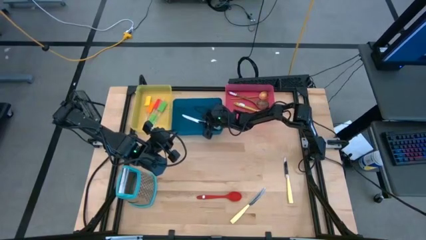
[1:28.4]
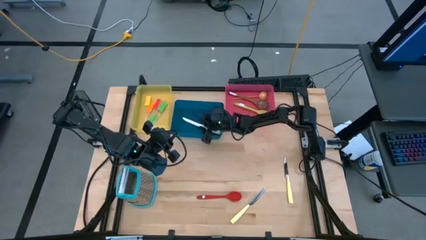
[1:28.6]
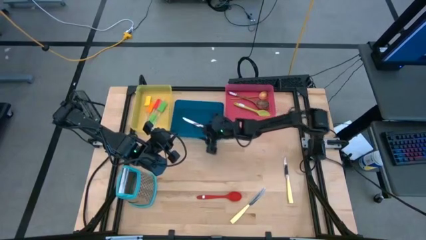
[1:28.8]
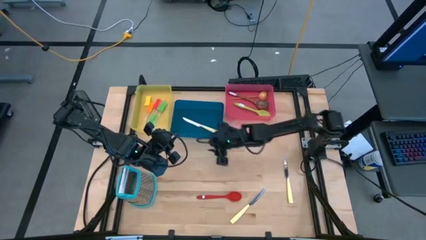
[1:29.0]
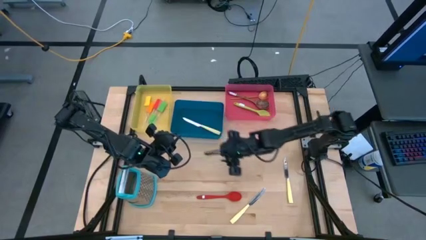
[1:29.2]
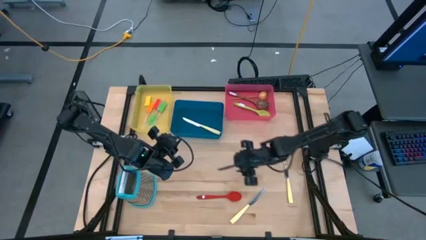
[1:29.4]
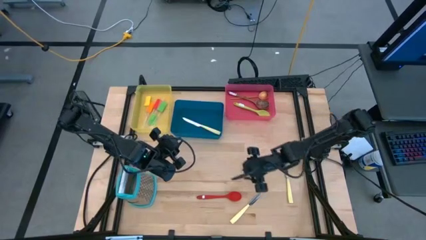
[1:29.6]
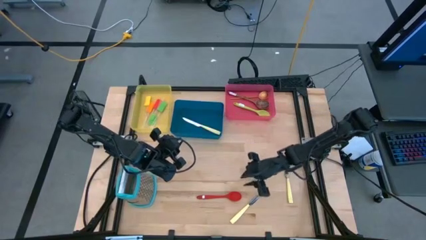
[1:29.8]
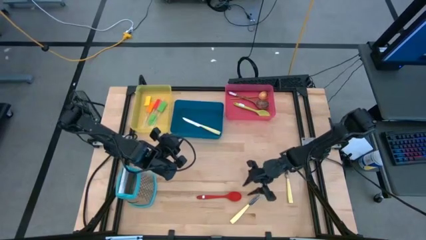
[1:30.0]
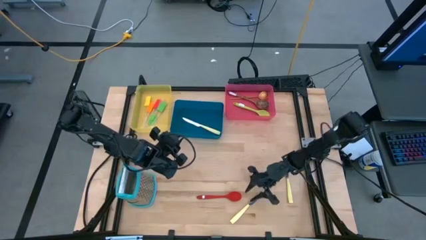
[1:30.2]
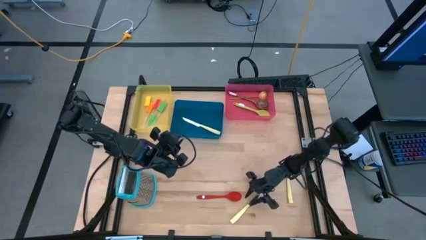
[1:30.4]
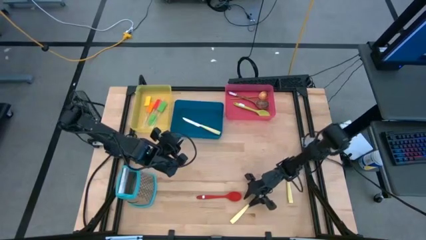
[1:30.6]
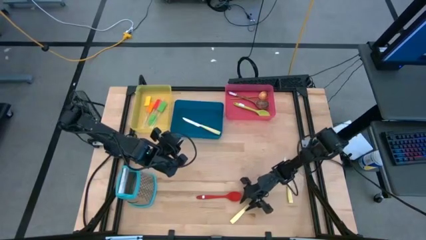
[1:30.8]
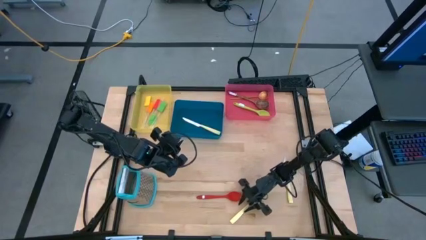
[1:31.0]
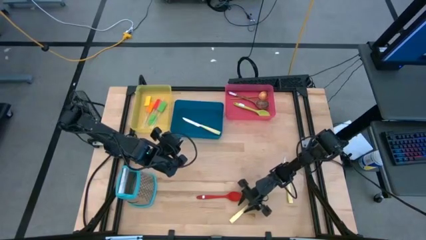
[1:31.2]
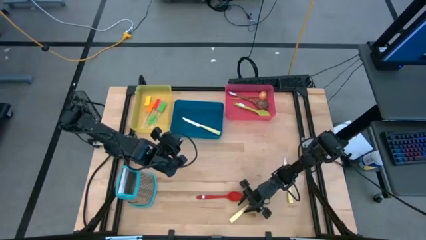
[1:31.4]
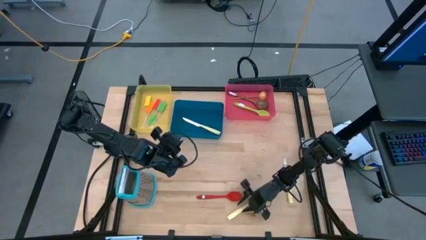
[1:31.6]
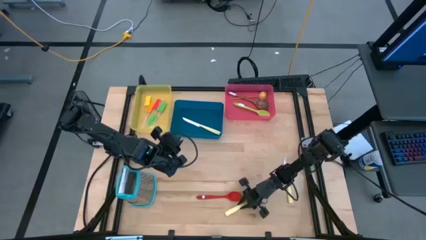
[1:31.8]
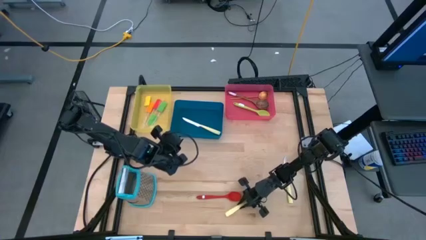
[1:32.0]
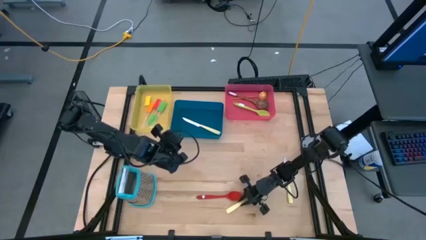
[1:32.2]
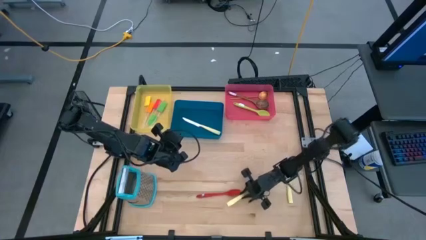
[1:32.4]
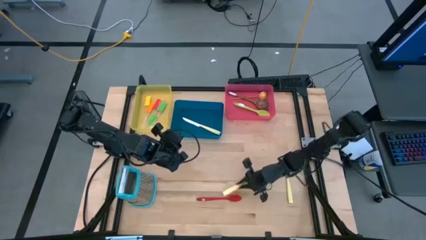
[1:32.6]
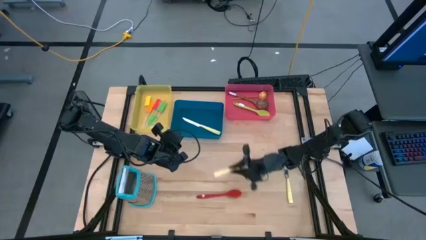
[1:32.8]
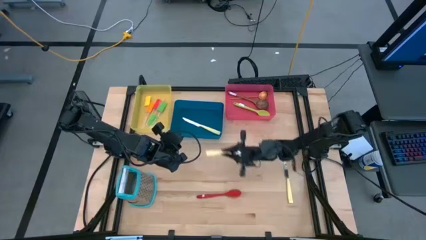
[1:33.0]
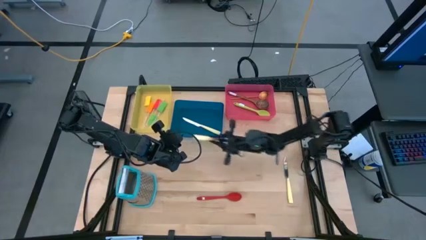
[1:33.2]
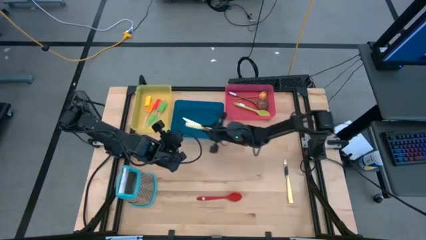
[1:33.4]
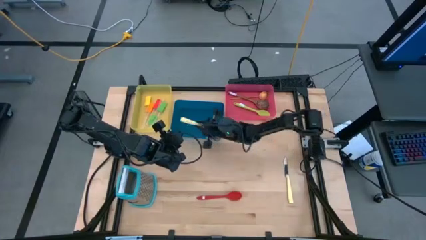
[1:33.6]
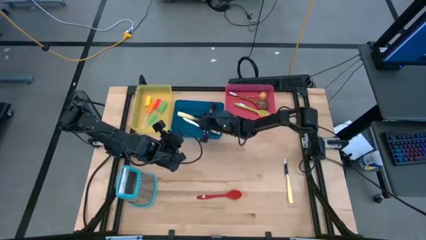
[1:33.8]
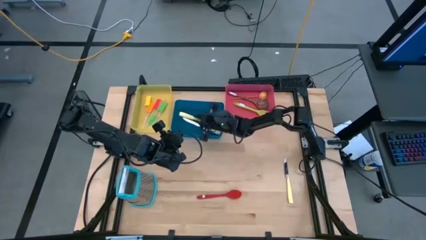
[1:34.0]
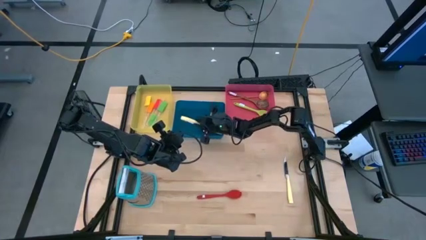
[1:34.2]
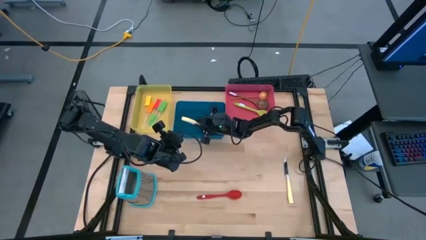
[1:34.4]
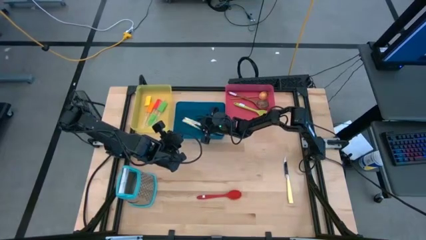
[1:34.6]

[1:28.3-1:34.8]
Task: Pick & Place Kitchen Items
Put the left light yellow knife into the blue bin

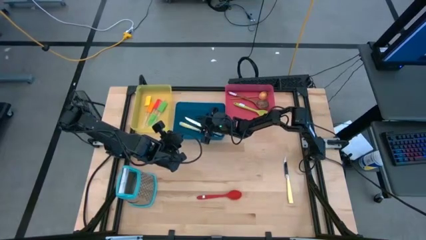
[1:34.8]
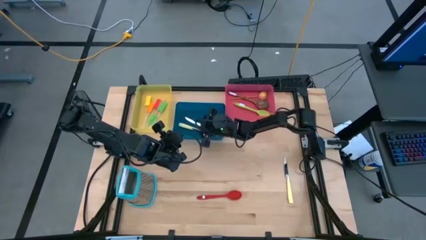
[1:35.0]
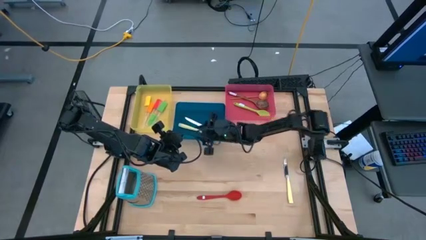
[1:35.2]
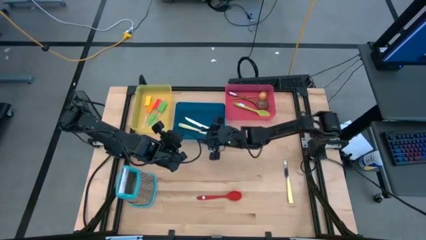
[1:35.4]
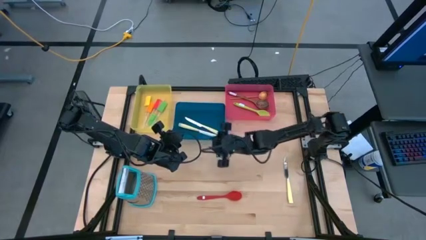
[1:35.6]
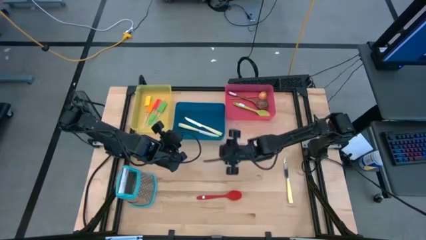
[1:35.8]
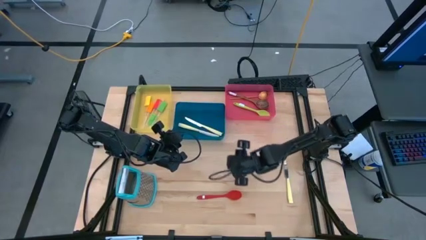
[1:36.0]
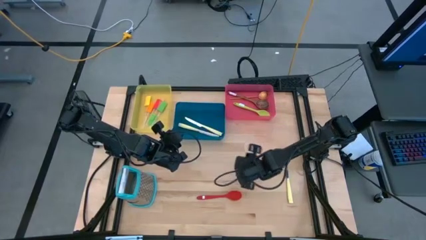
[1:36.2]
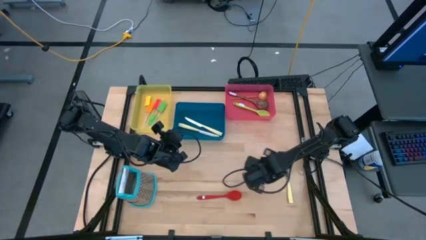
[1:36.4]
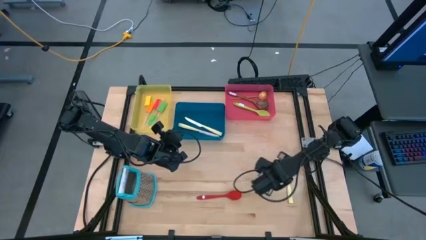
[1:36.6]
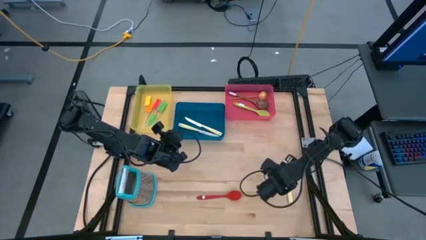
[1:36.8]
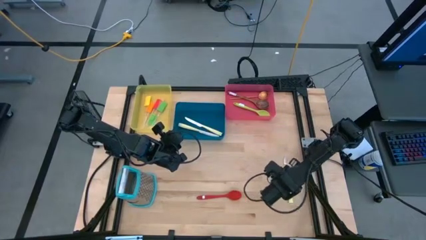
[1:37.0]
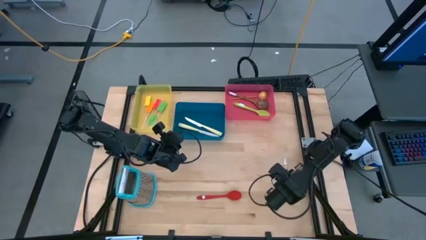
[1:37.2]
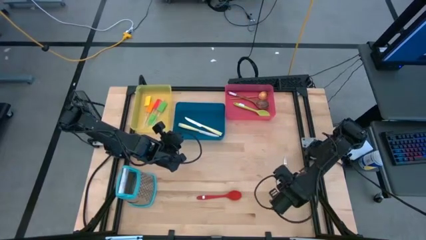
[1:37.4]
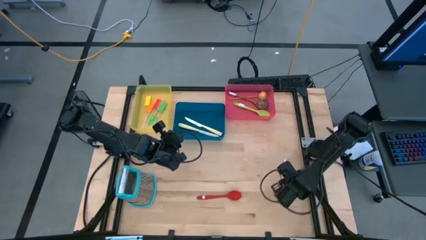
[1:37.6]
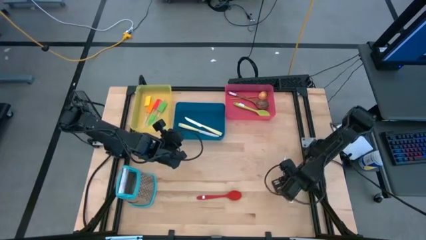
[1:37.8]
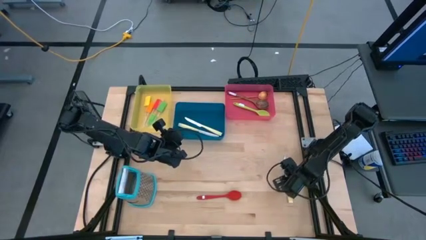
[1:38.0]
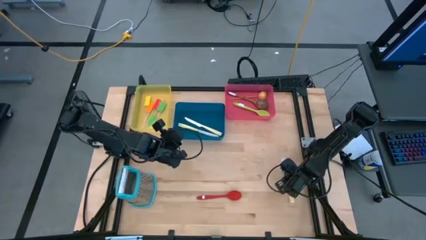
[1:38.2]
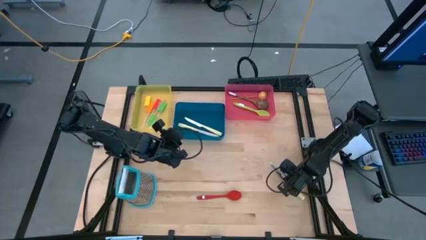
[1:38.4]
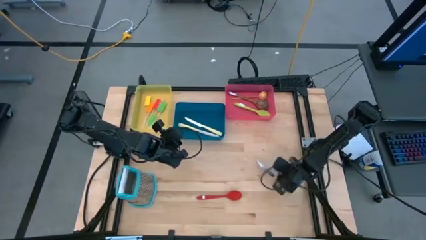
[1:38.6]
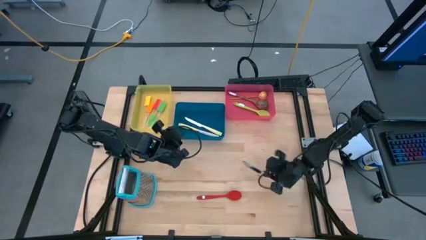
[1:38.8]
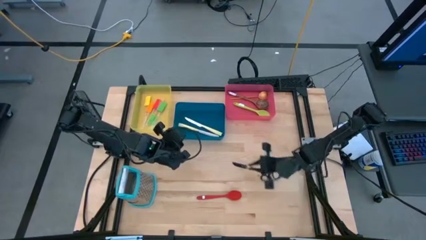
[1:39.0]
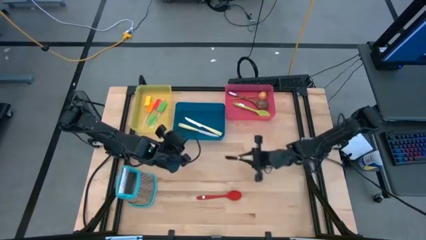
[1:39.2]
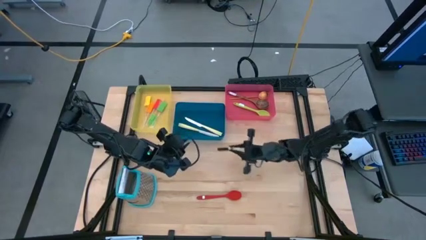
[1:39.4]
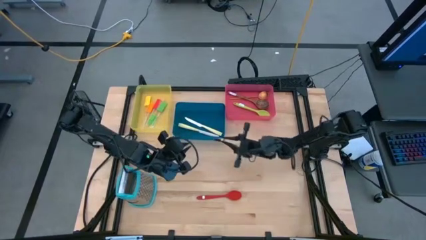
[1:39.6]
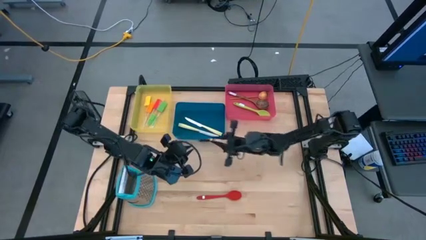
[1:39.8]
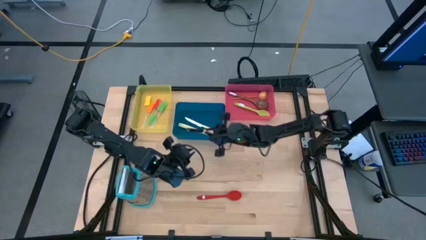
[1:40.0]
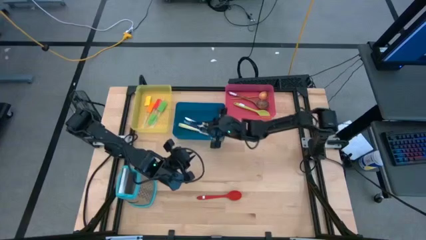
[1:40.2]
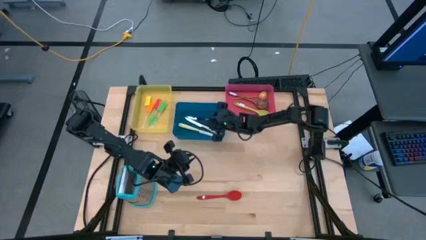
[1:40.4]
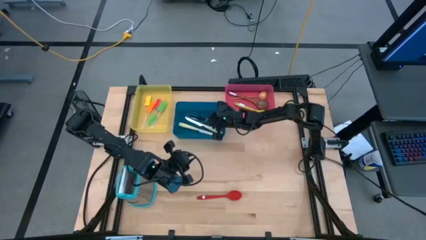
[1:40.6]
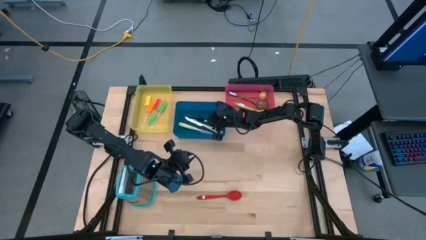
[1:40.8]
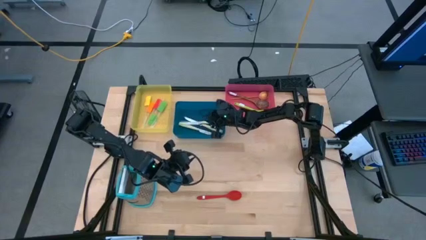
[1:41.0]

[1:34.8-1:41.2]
Put the light yellow knife into the blue bin

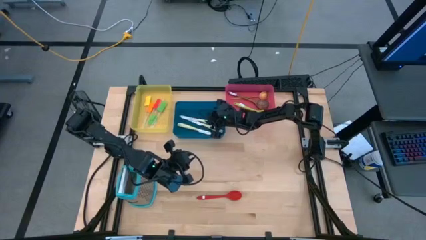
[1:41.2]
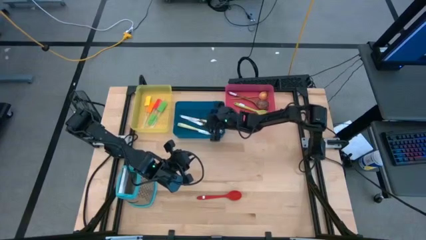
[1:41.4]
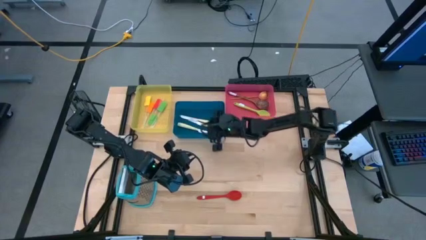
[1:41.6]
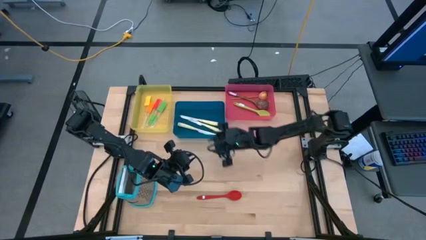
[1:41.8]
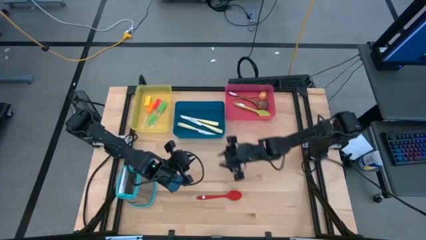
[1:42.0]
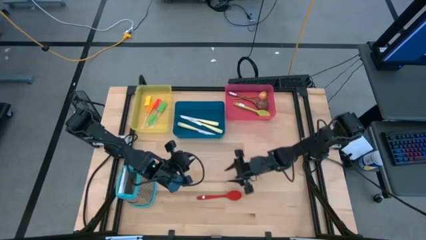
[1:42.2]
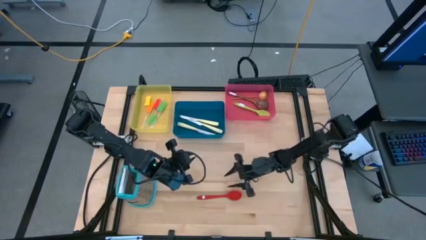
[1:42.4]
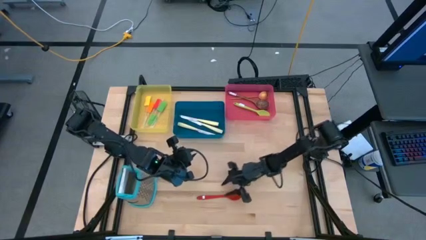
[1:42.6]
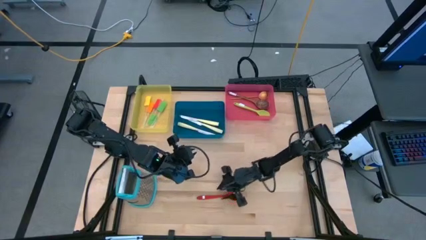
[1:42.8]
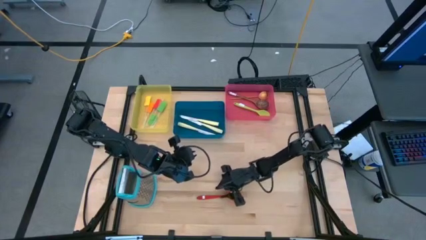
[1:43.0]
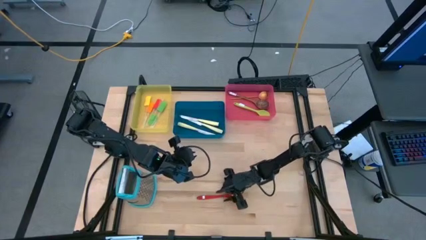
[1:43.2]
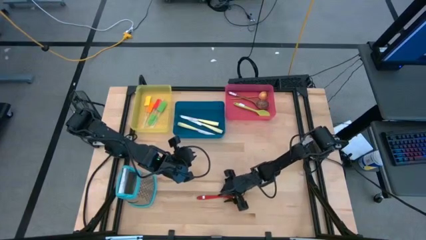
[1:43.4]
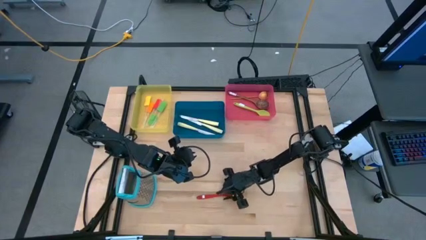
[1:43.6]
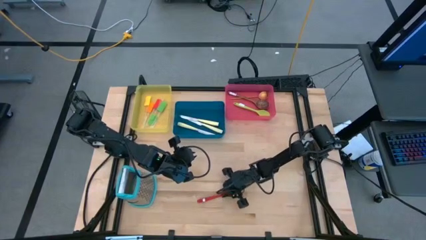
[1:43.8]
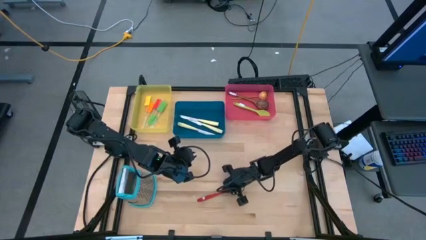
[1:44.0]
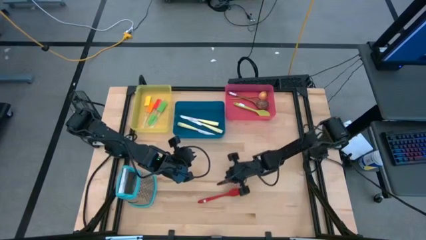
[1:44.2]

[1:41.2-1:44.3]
Put the red serving spoon into the red bin

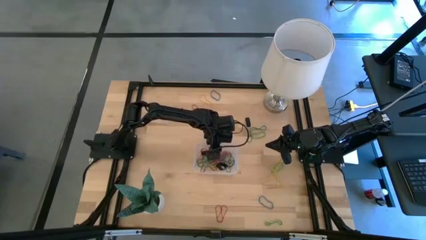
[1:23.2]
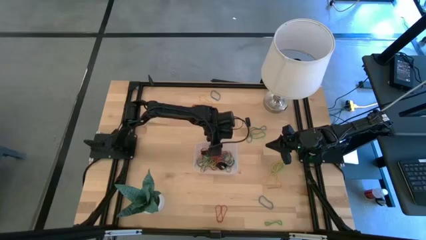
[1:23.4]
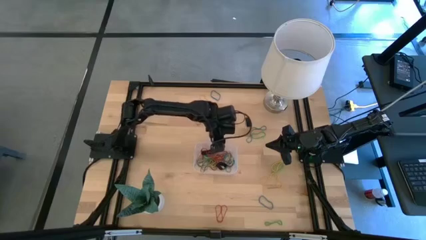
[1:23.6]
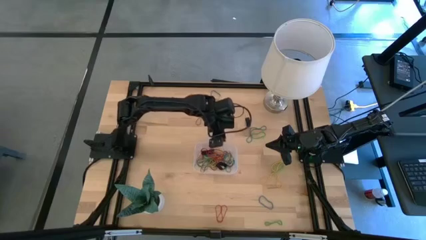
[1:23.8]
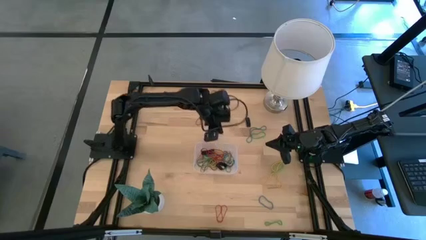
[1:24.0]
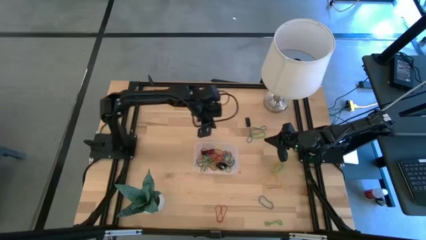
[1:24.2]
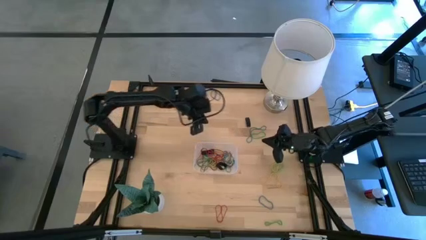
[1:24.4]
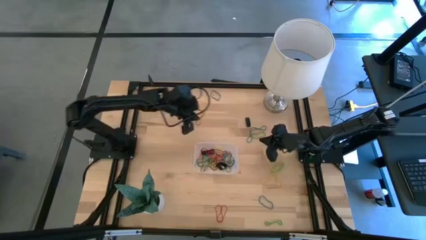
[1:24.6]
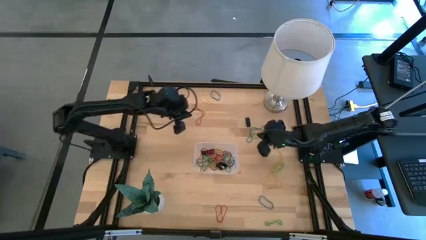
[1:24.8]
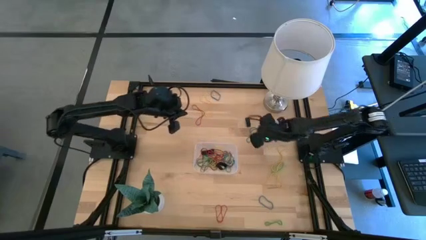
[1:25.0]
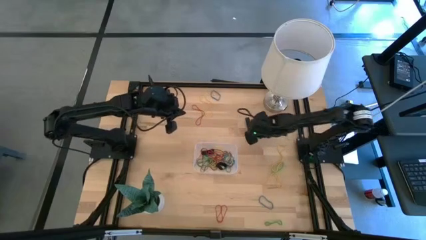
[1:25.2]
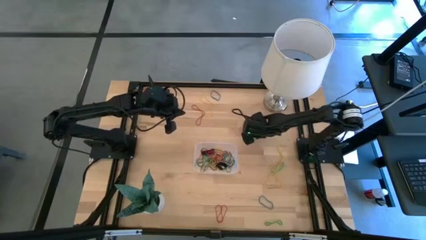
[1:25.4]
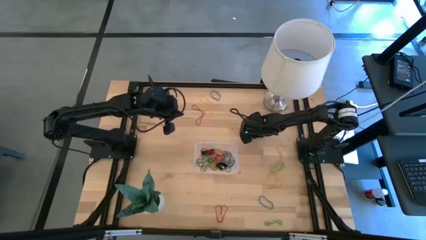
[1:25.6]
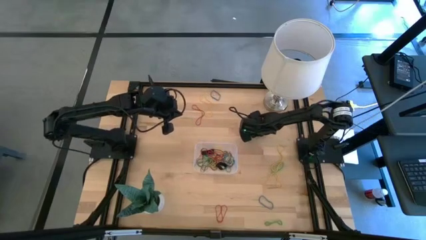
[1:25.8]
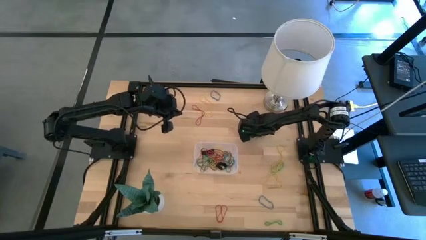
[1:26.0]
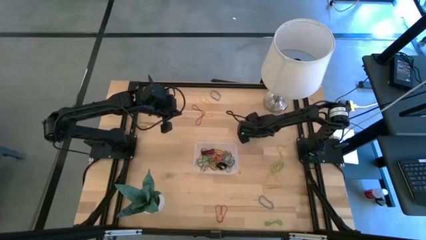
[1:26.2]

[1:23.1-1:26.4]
Task: Pick and place rubber bands into bin
Put the blue rubber band into the transparent bin
